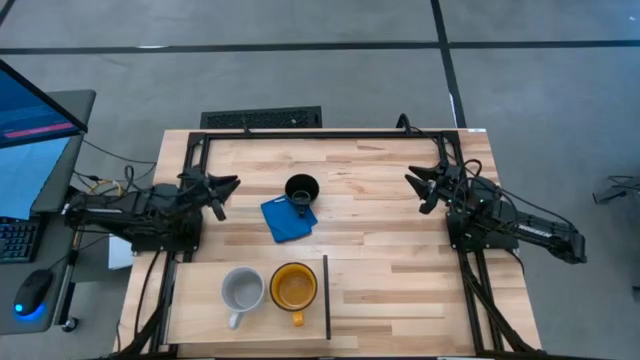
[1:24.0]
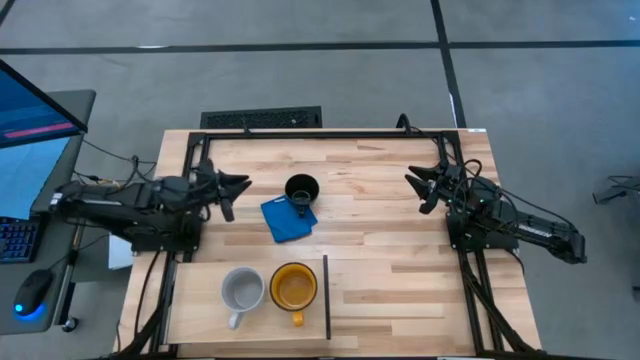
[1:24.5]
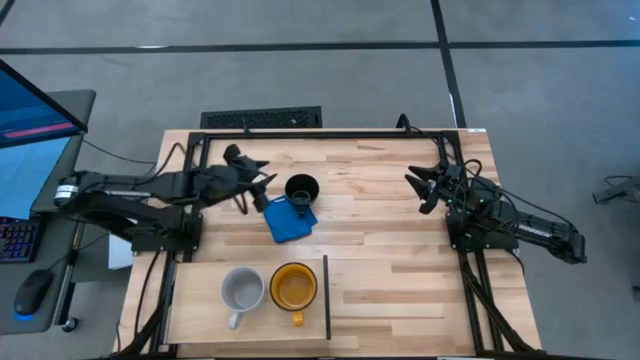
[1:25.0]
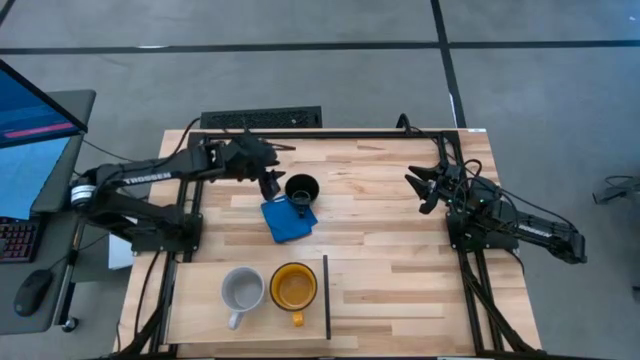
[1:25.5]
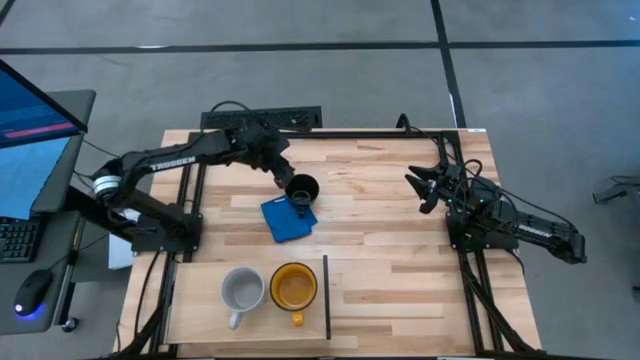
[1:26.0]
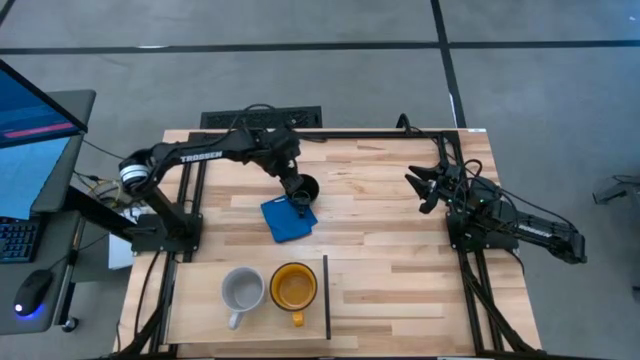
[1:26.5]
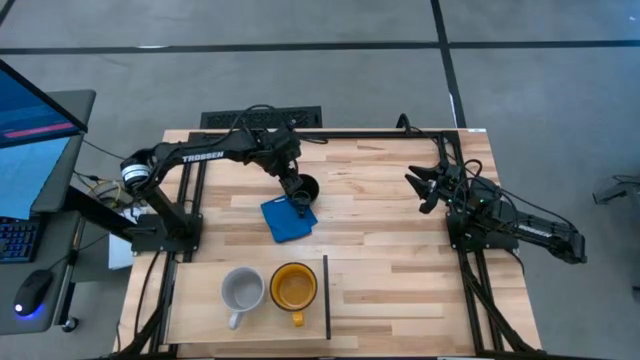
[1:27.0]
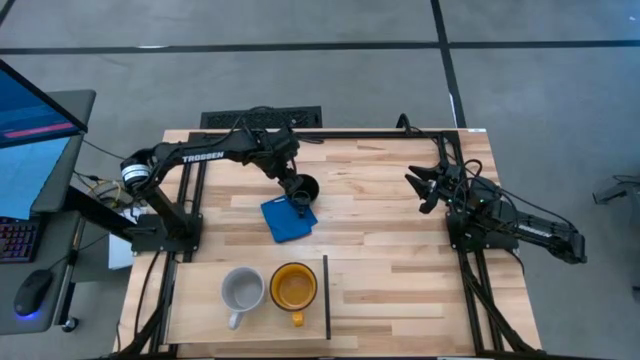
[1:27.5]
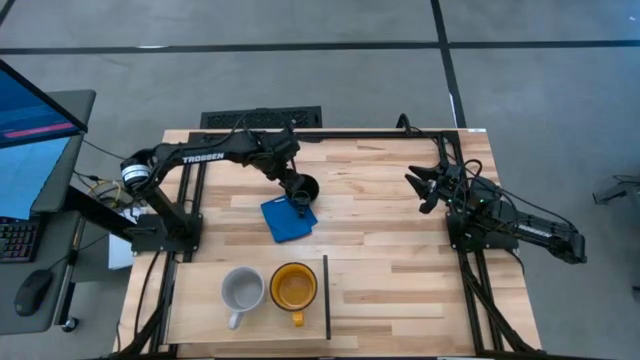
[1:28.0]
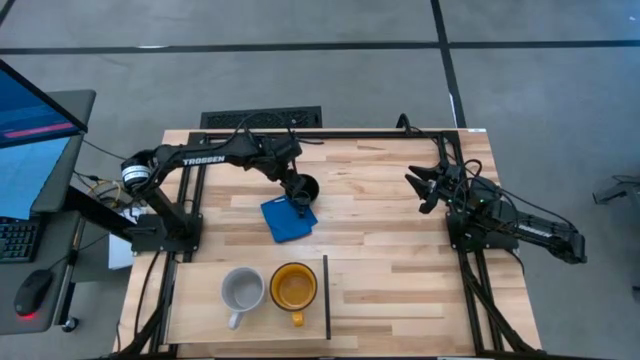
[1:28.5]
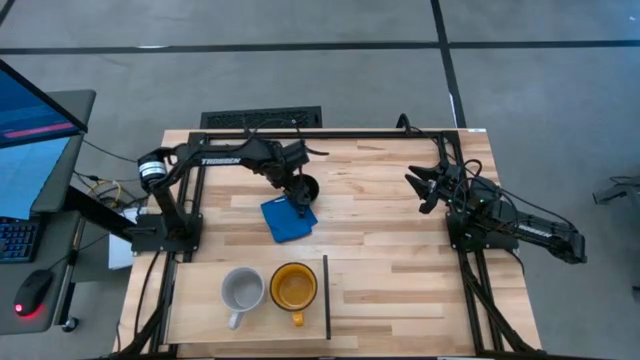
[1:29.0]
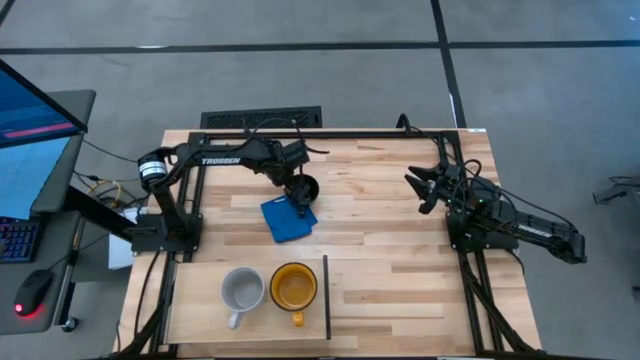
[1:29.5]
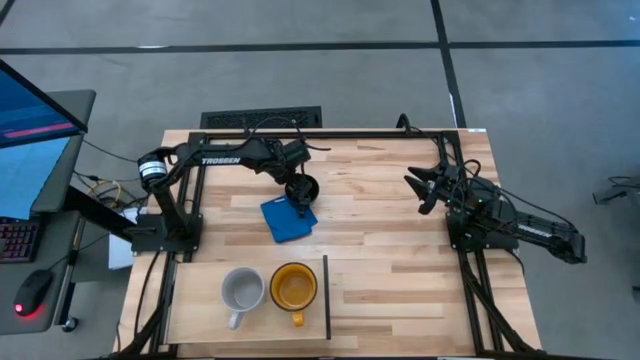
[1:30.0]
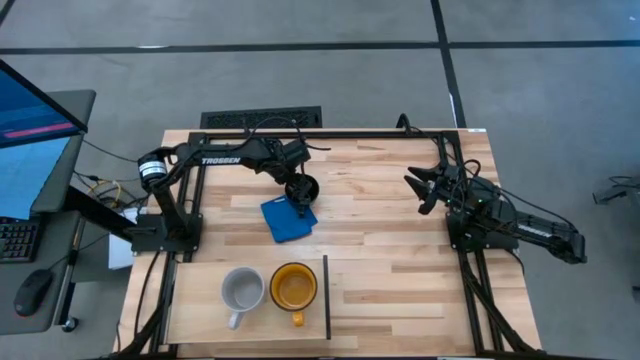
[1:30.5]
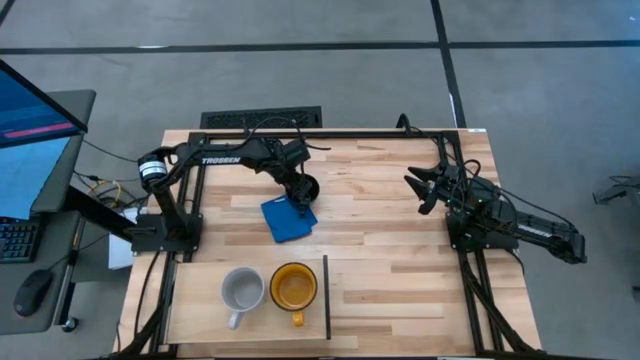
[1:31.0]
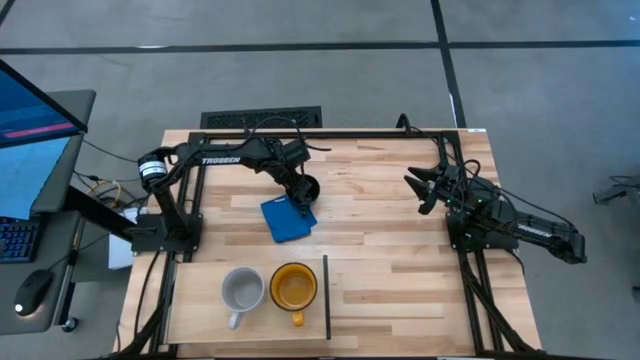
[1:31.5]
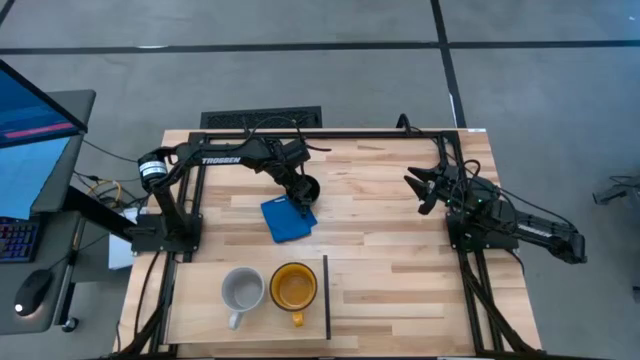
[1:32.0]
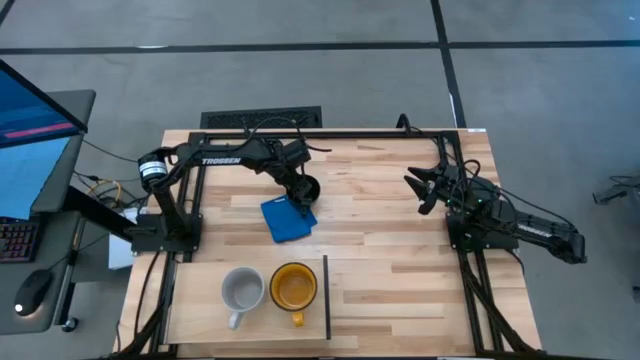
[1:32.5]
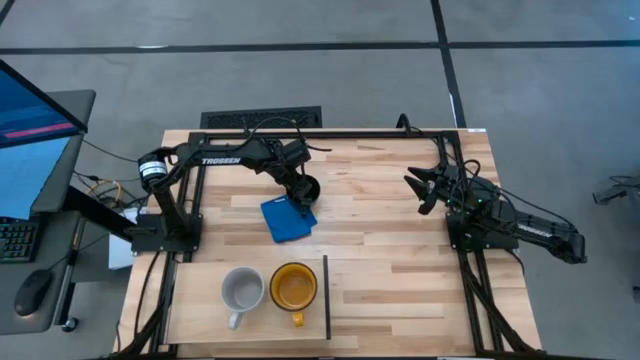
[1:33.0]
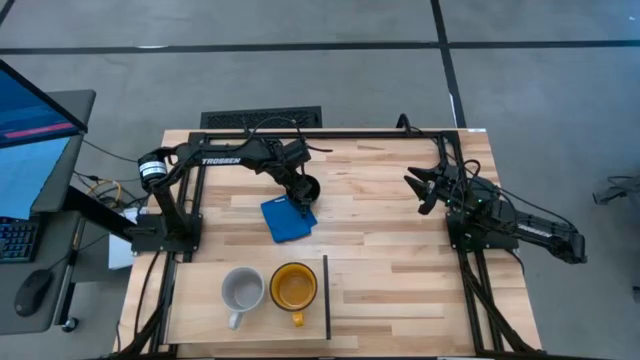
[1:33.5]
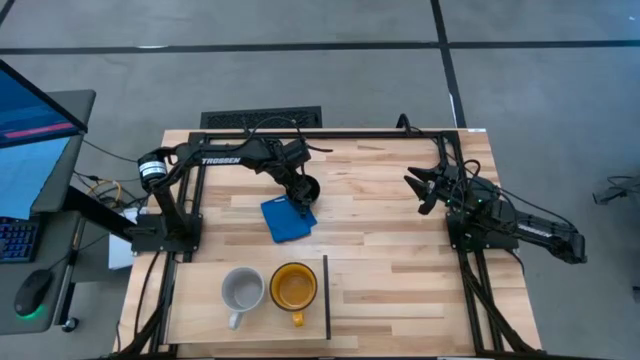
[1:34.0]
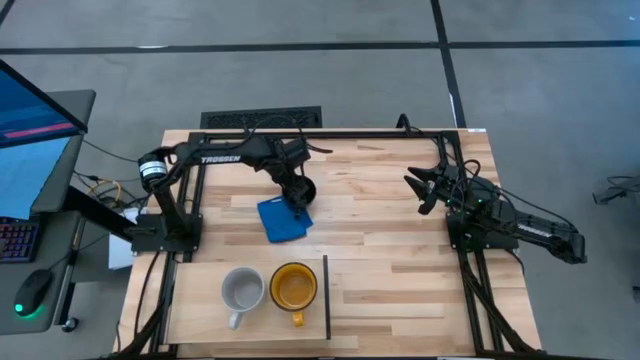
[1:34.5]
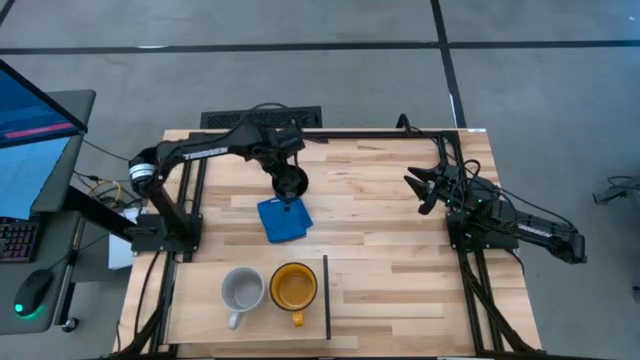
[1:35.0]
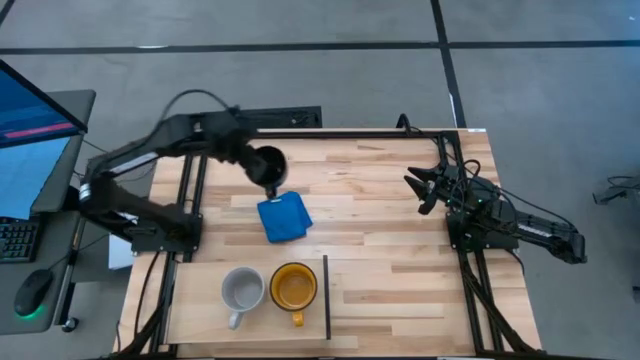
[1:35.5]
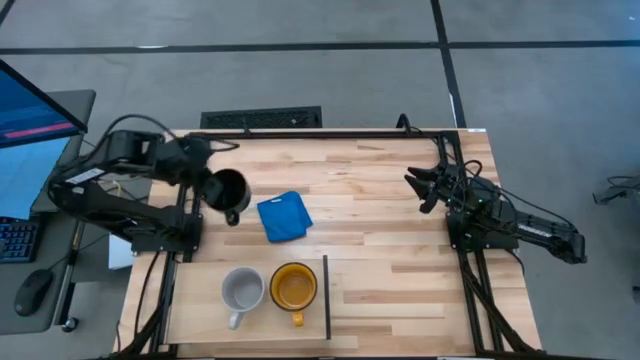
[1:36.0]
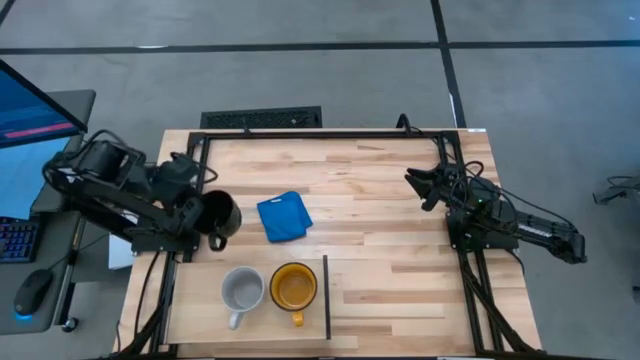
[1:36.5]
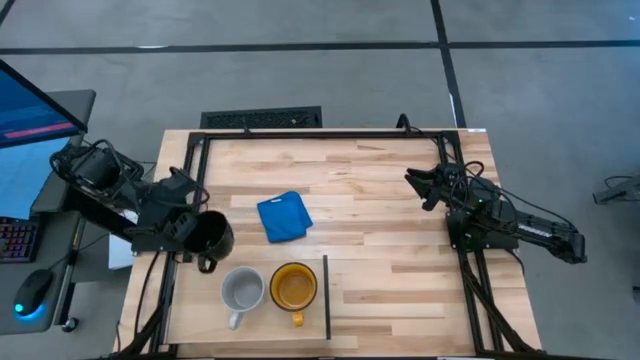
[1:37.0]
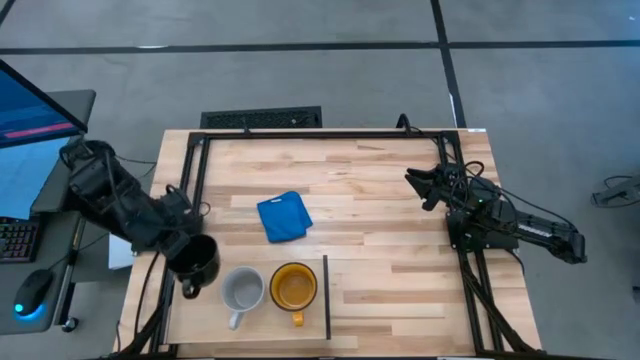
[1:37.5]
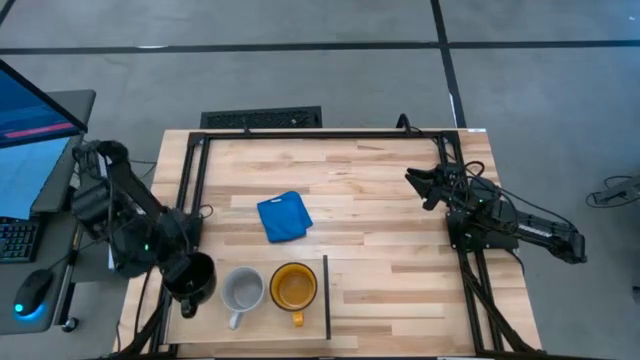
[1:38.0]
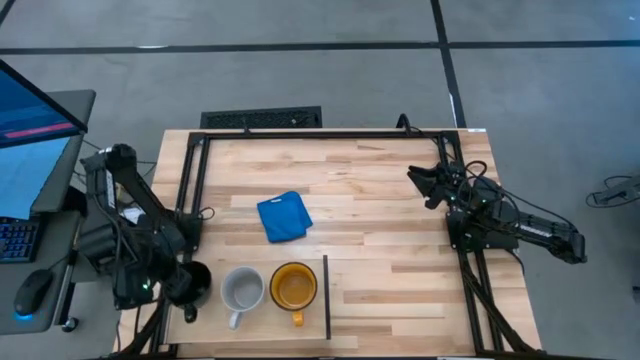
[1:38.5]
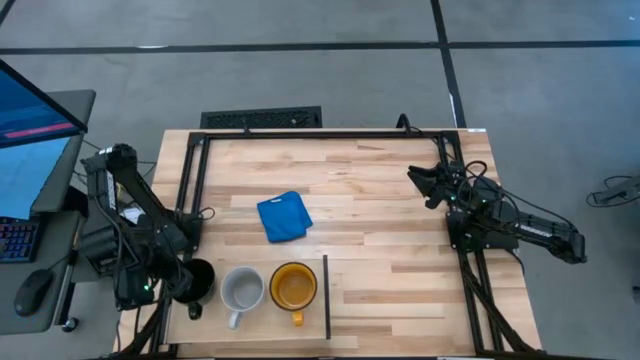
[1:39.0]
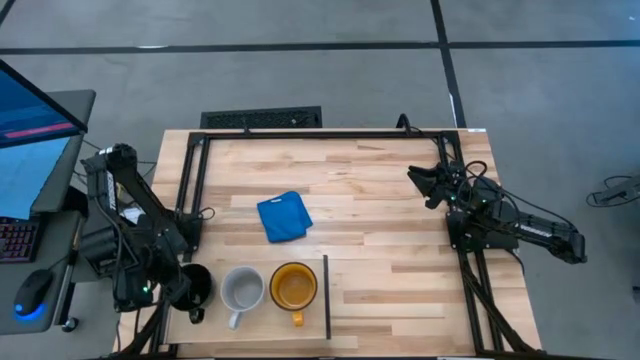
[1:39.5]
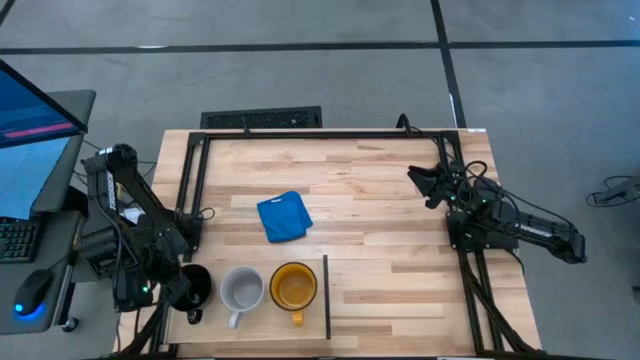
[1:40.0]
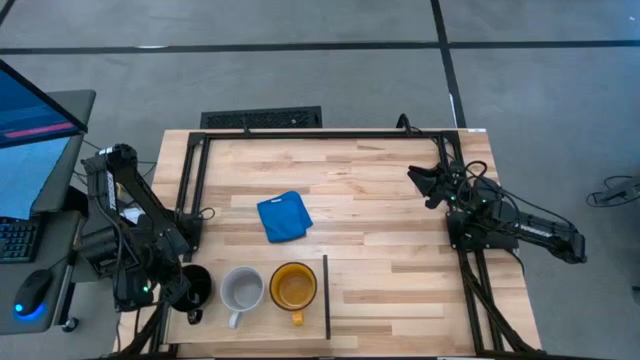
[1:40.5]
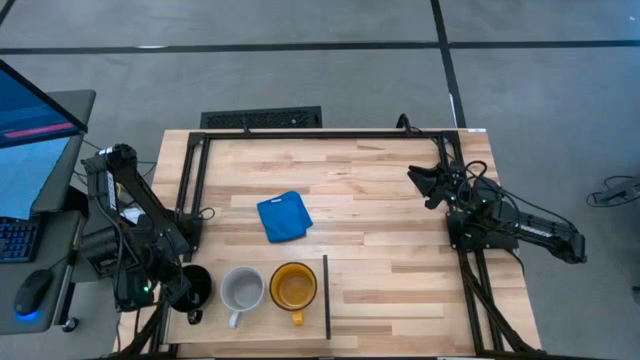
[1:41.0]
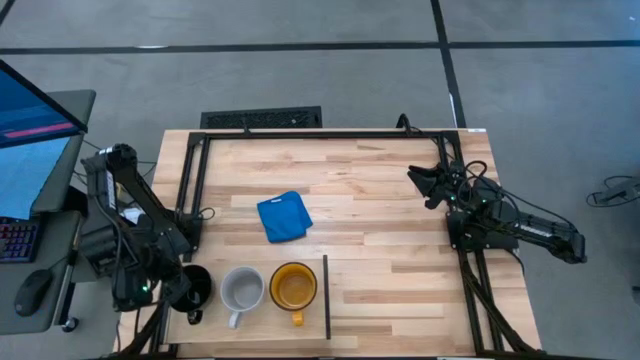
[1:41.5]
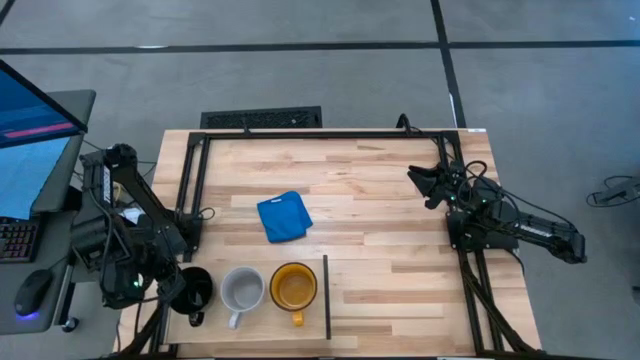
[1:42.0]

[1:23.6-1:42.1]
Task: Stack small to large cups/mugs on shelf
Put the black mug on the shelf

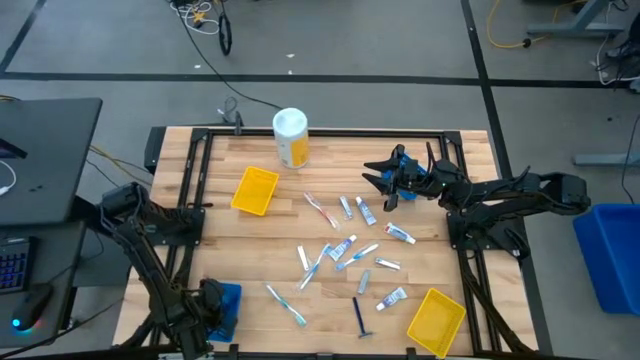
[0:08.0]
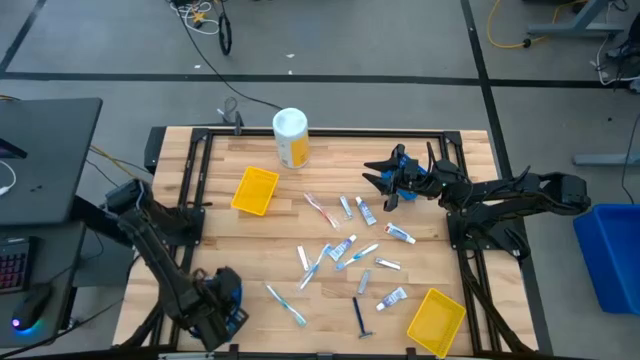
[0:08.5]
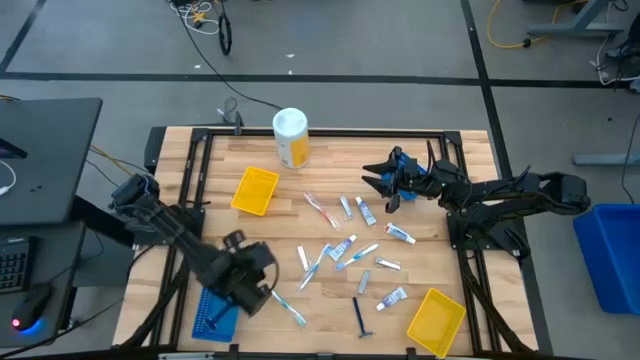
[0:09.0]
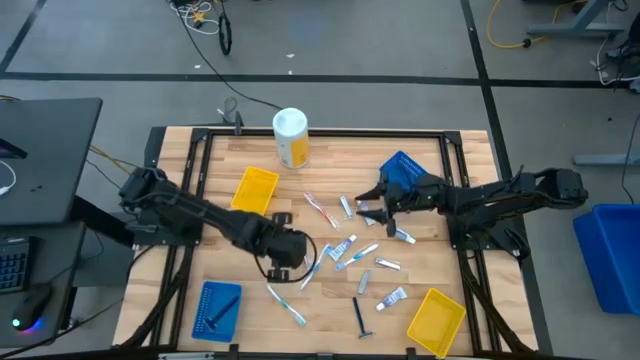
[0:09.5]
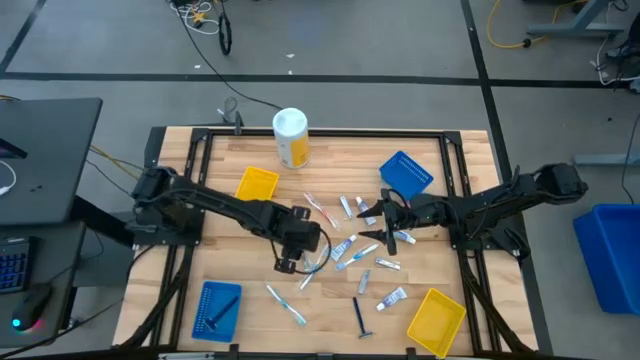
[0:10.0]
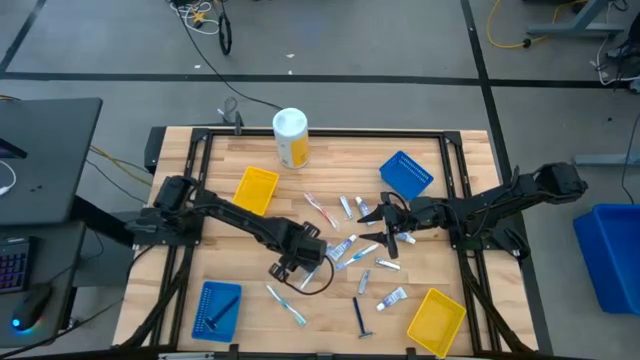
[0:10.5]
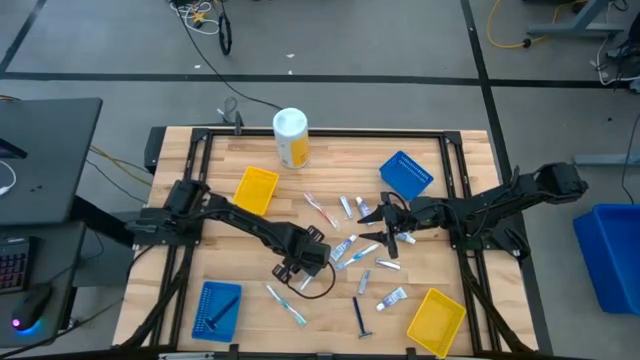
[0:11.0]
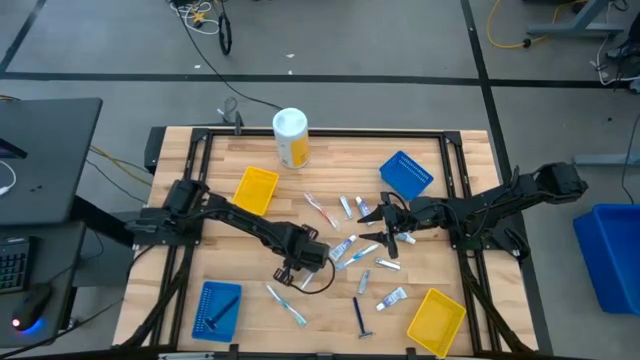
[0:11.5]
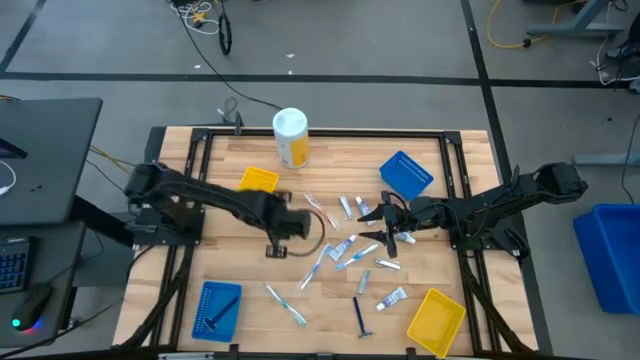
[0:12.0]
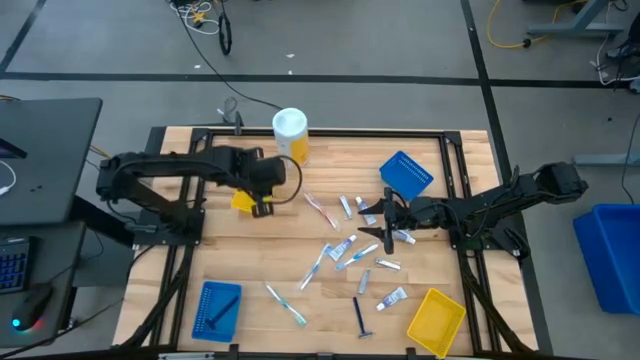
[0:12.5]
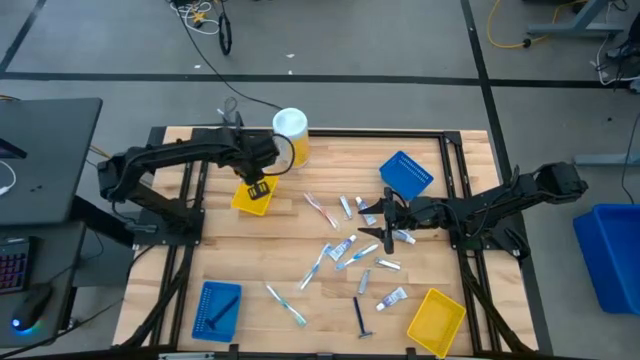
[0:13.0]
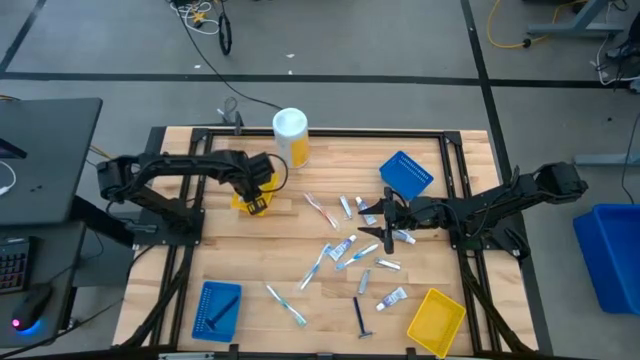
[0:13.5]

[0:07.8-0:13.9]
Task: Pick & Place Travel size toiletries
Put the silver nail cutter into the top yellow bin
